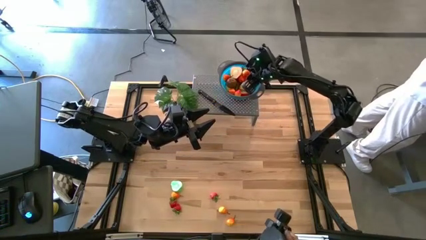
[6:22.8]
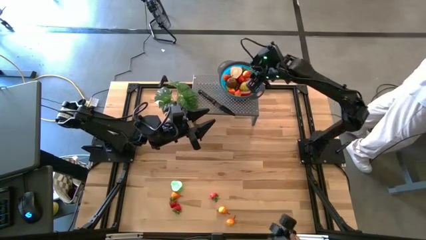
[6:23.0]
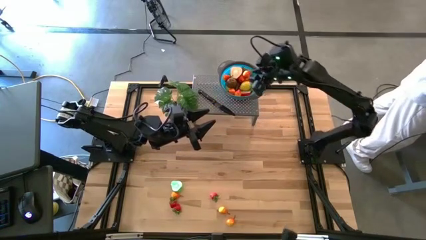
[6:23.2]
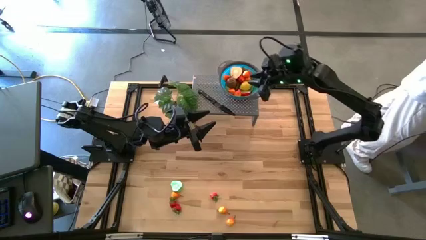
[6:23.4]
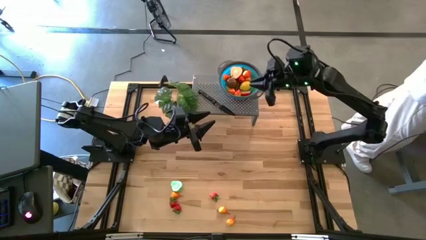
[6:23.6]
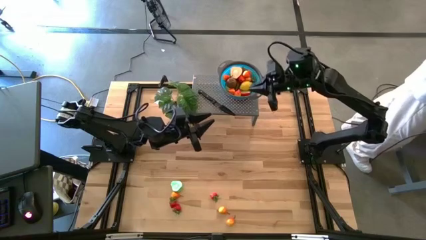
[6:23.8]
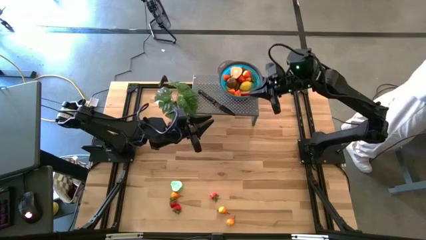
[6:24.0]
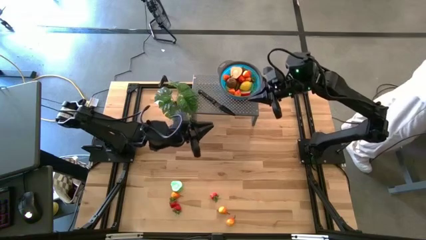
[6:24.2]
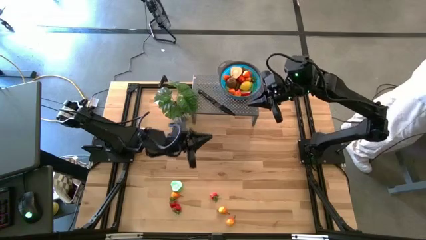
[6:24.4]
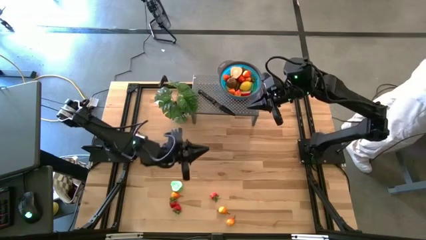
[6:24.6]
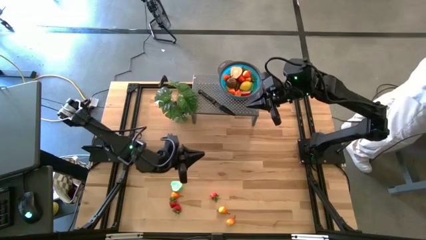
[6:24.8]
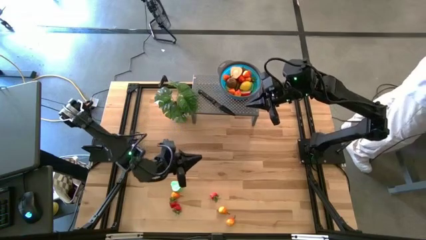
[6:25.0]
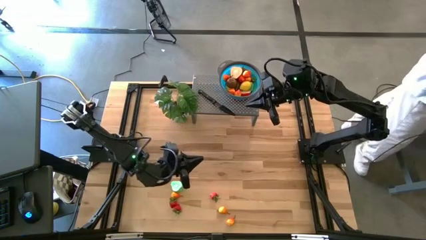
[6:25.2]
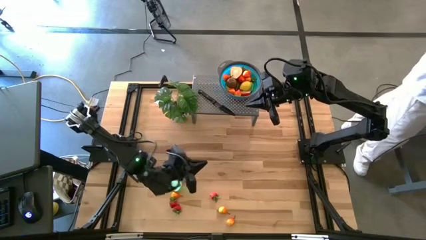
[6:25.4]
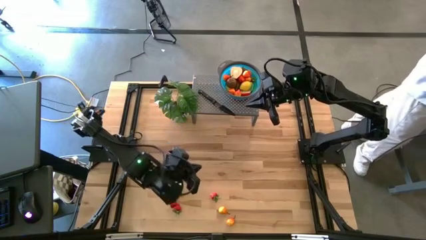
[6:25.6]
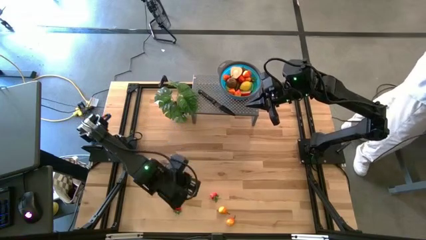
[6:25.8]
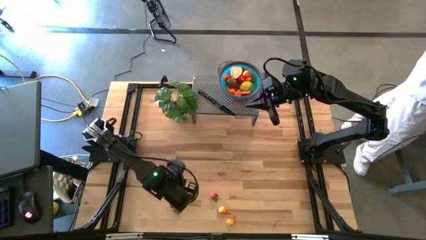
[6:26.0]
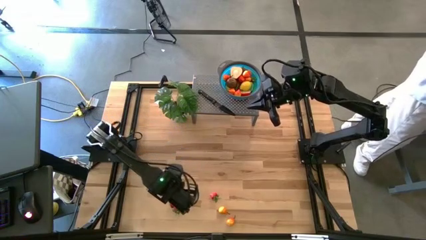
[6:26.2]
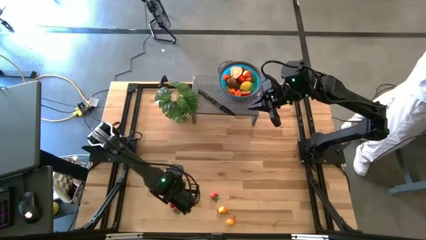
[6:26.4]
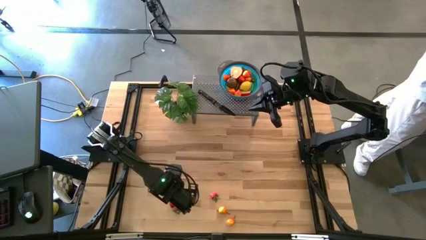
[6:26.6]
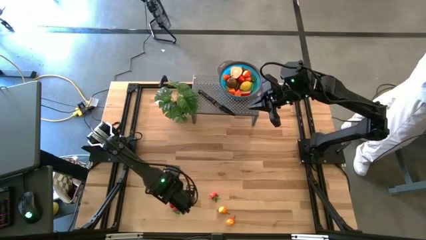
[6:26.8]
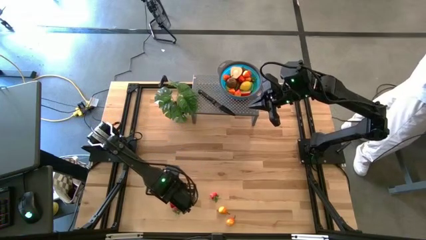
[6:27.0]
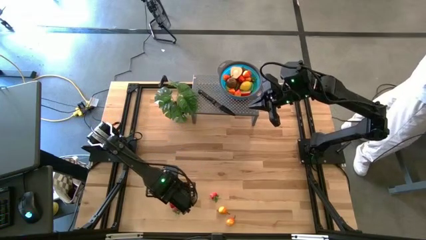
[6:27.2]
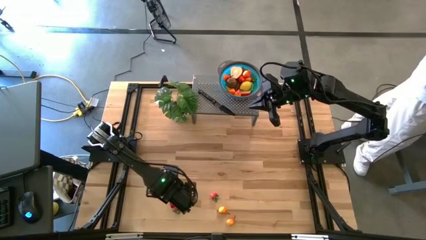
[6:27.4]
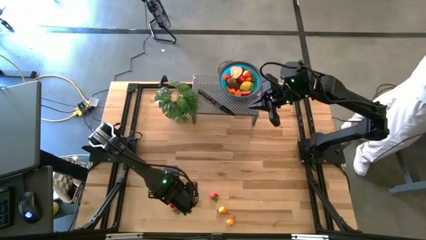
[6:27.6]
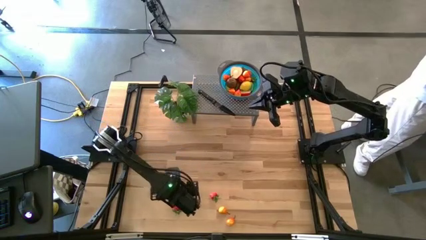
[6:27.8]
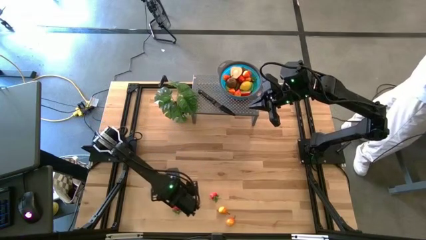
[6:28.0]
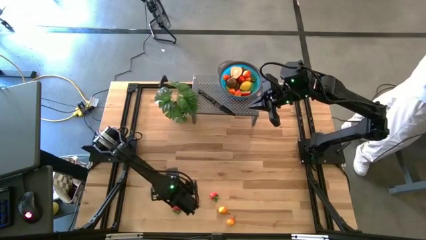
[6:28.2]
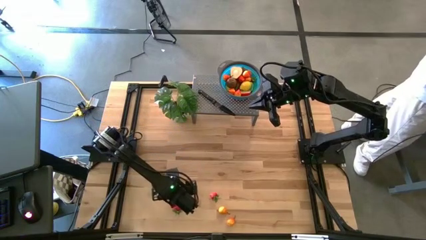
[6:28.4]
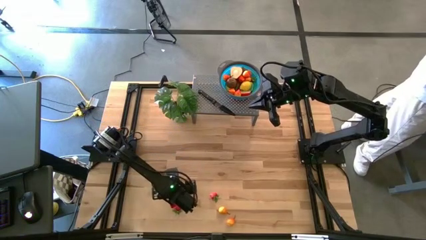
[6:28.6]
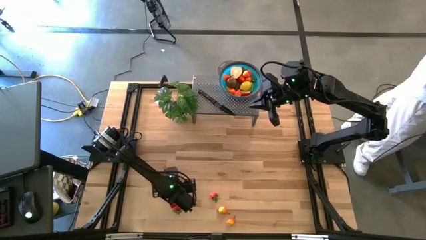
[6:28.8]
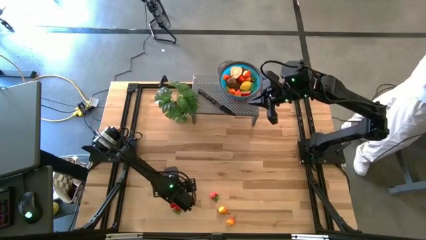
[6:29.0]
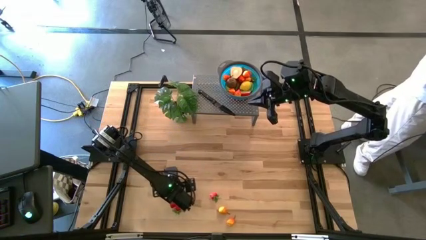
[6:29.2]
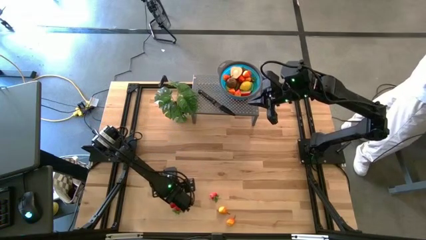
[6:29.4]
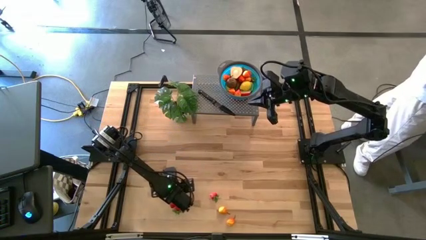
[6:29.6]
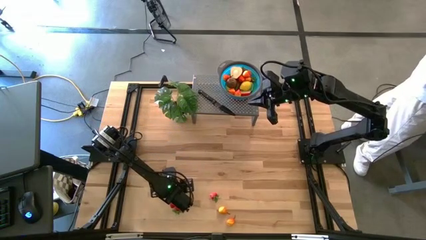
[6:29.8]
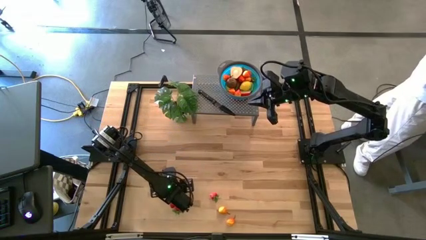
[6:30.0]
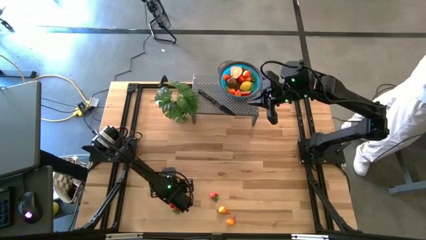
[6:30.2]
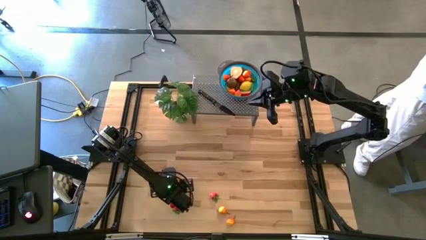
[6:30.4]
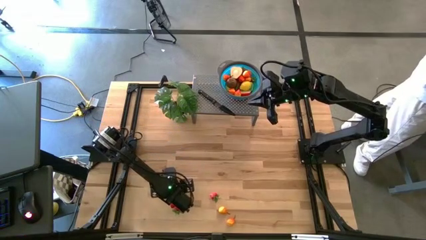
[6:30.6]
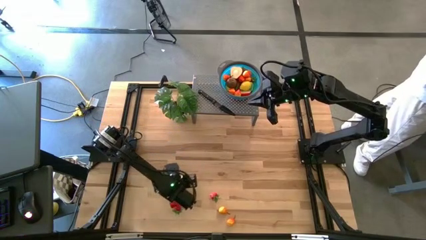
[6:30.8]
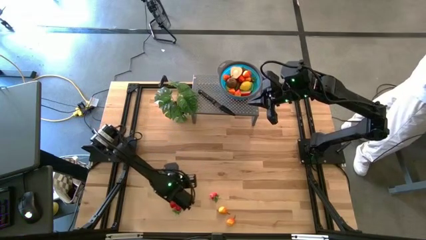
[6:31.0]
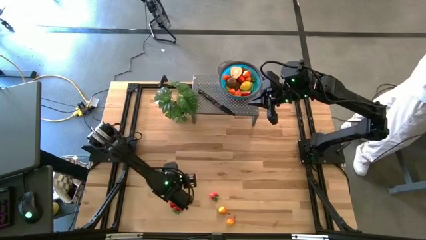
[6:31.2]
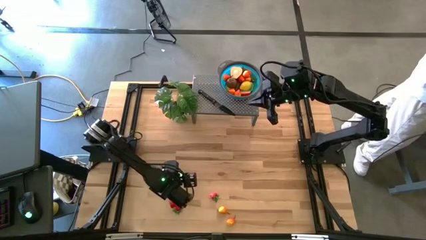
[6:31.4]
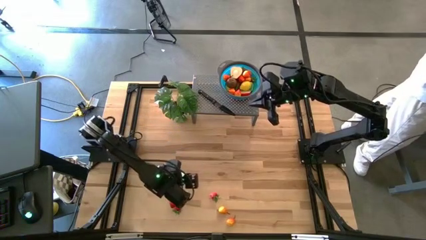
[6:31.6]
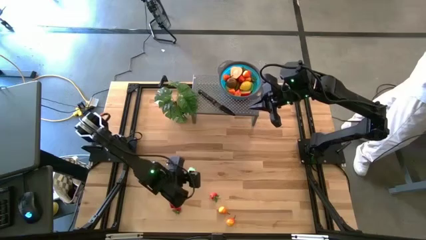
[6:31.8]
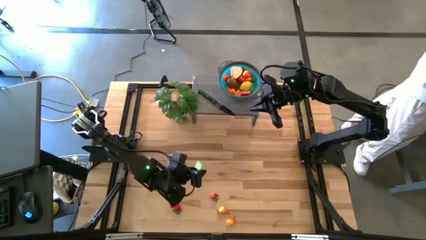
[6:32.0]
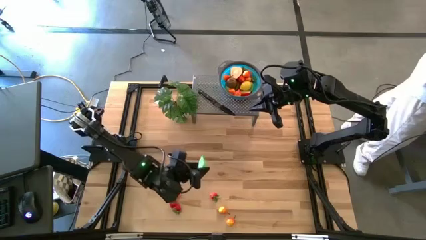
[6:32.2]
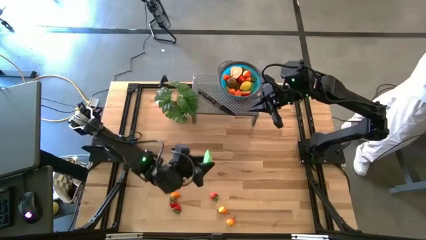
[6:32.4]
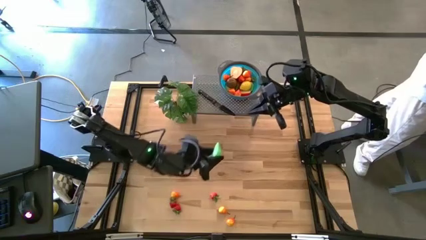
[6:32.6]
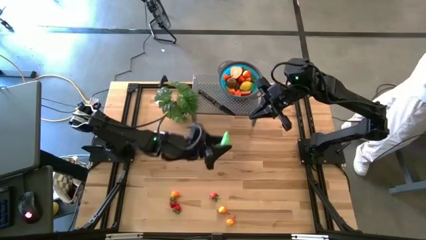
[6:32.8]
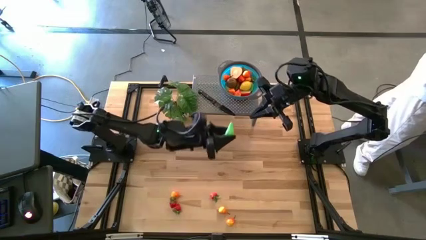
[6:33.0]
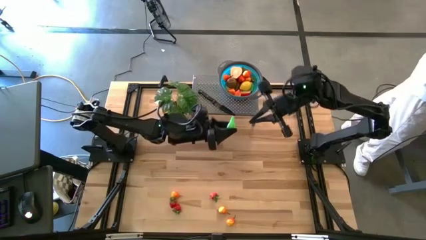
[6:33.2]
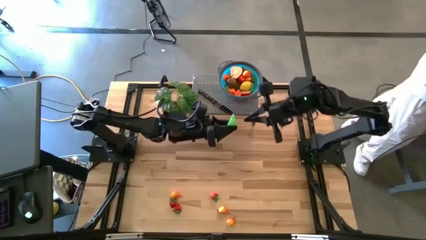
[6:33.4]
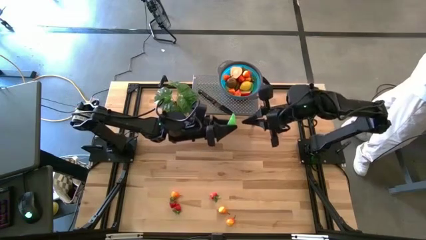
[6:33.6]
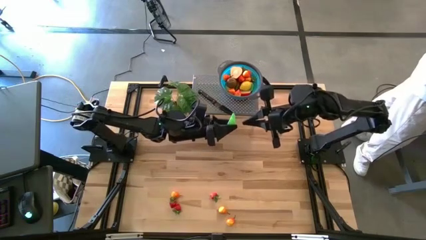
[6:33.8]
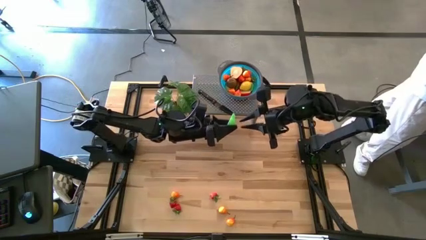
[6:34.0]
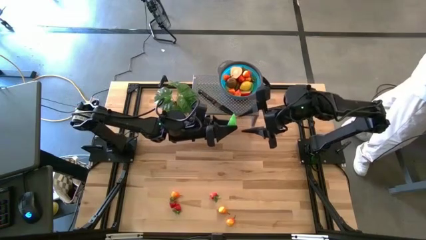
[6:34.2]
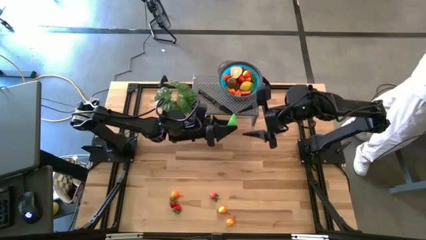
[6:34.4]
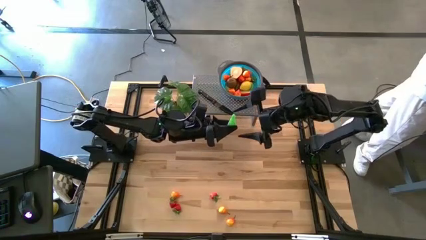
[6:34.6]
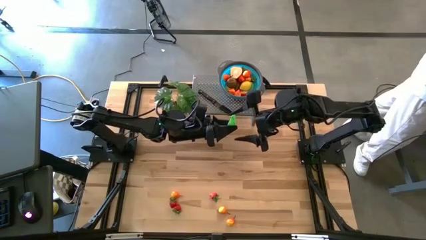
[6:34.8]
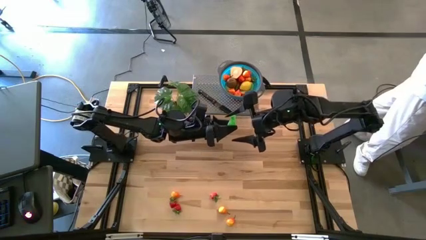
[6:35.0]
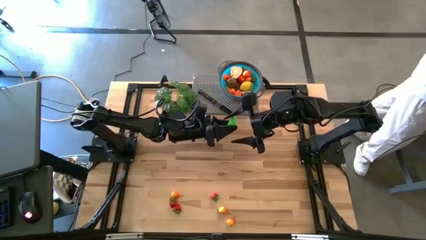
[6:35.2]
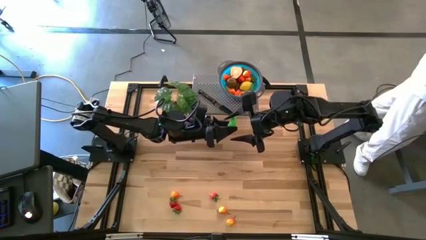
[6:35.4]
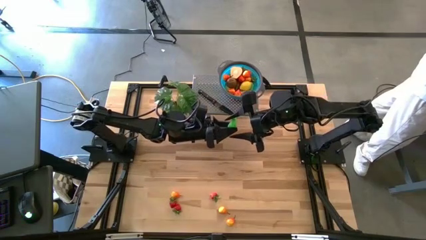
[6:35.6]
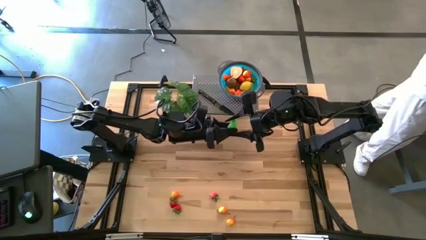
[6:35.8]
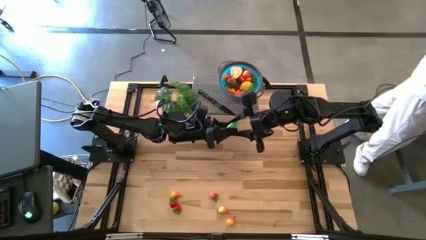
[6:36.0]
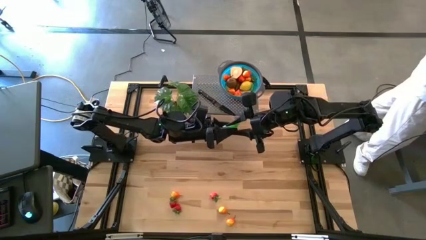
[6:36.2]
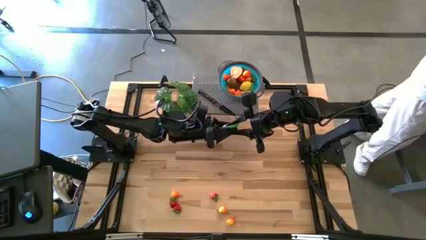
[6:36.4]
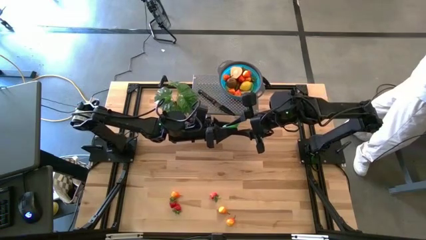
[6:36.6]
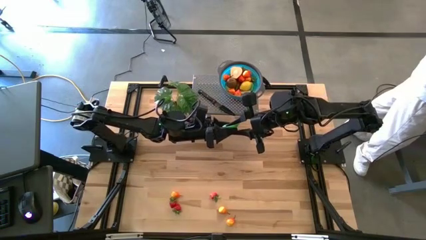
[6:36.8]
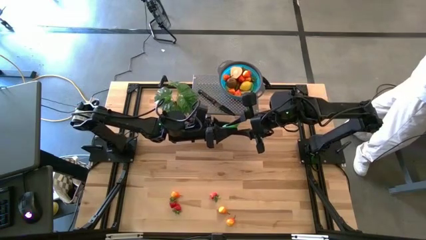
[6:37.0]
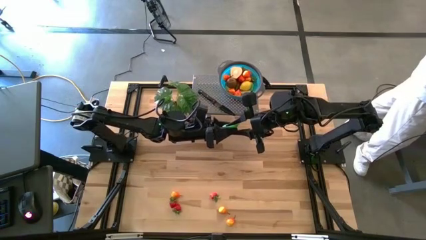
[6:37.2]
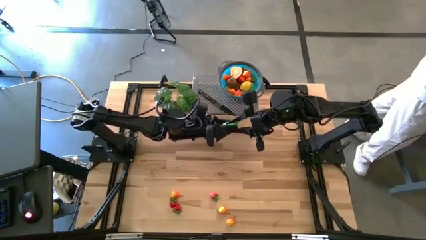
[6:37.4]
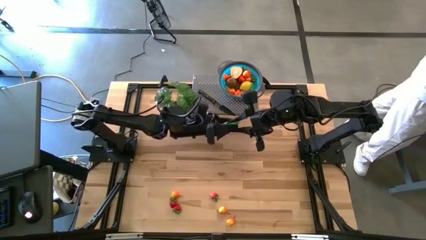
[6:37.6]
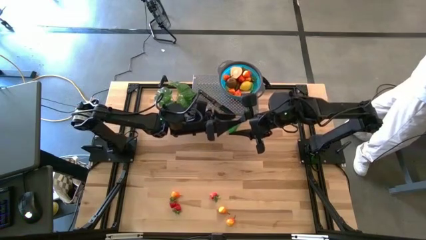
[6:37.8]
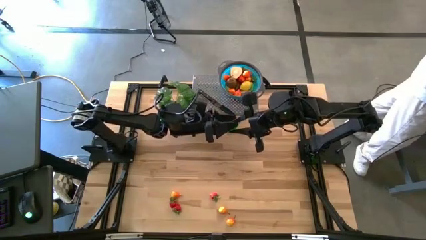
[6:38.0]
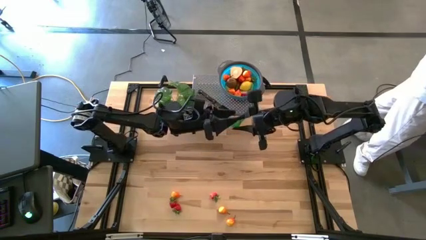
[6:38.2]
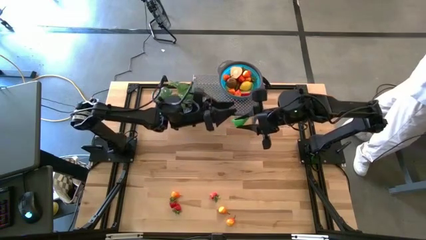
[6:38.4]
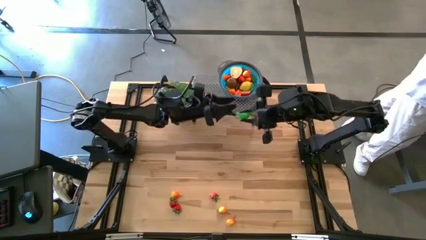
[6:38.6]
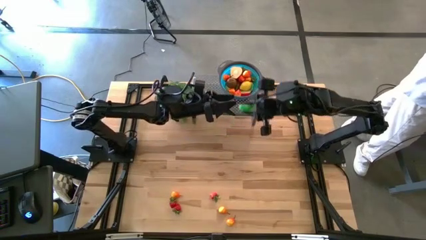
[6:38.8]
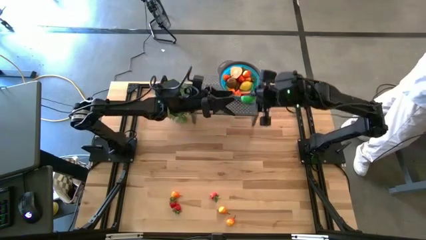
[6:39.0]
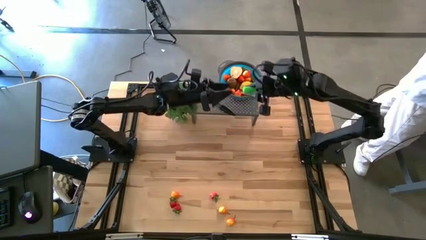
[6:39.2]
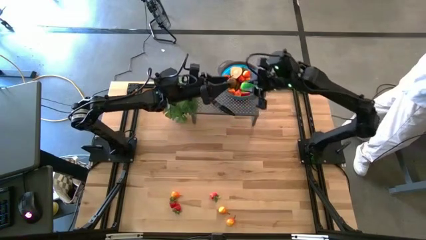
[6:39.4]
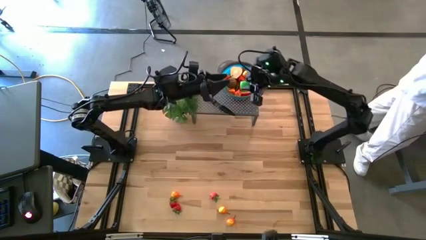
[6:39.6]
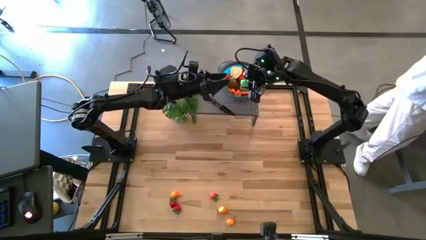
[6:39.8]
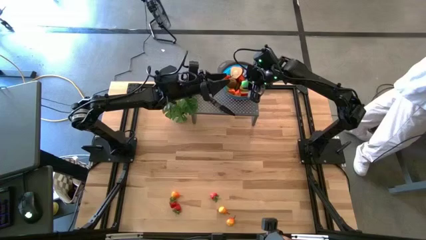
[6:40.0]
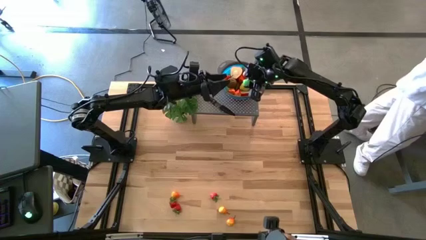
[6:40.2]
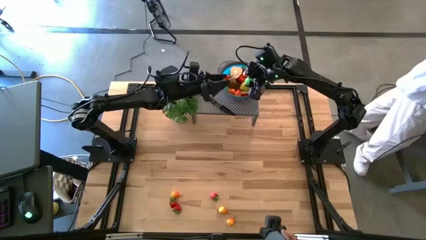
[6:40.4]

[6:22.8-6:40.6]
Task: Pick & Place Fruit
Put the green avocado in the blue bowl on the shelf
